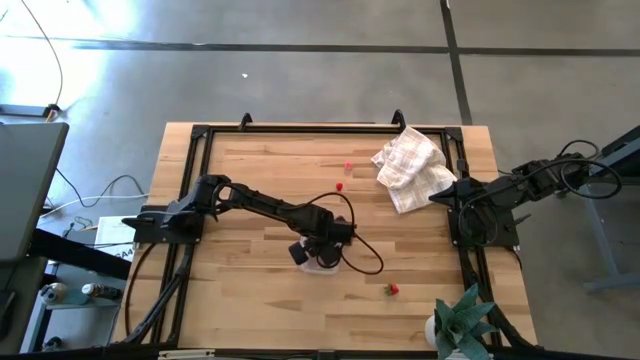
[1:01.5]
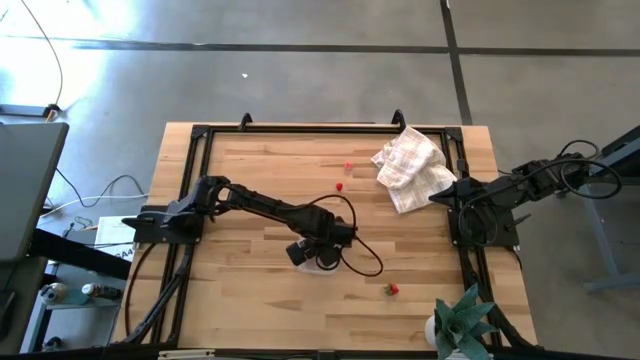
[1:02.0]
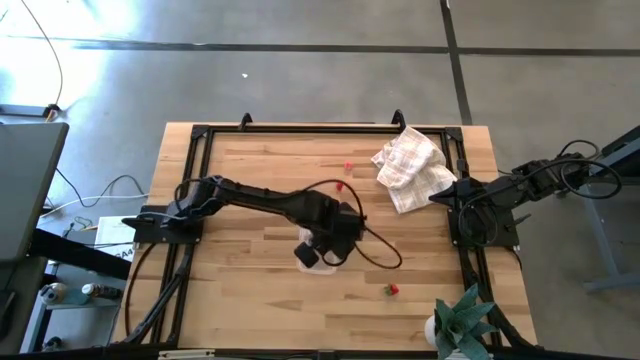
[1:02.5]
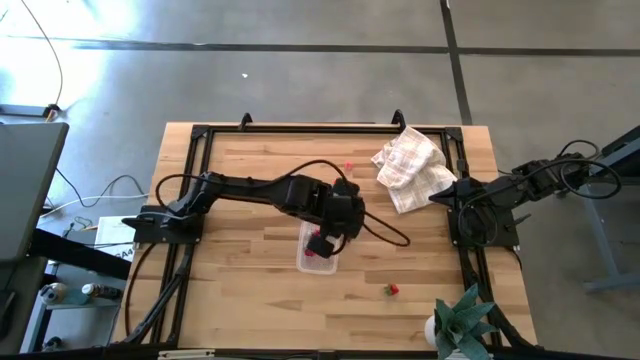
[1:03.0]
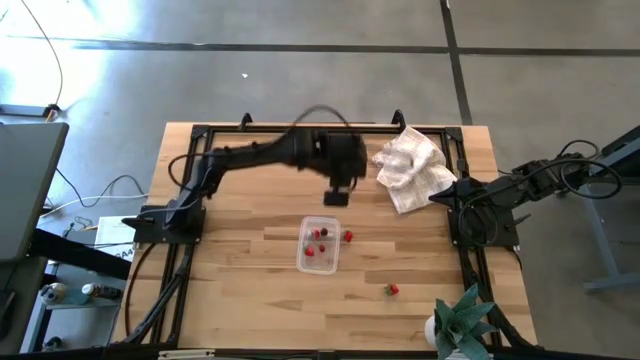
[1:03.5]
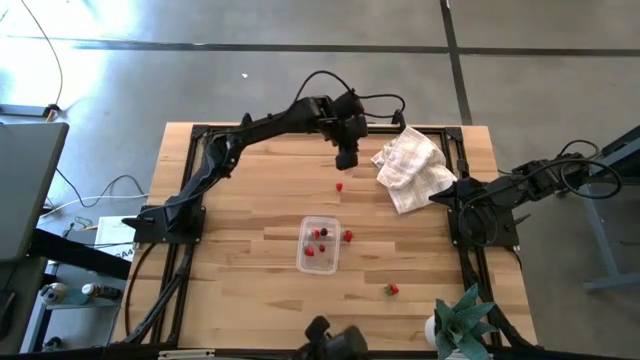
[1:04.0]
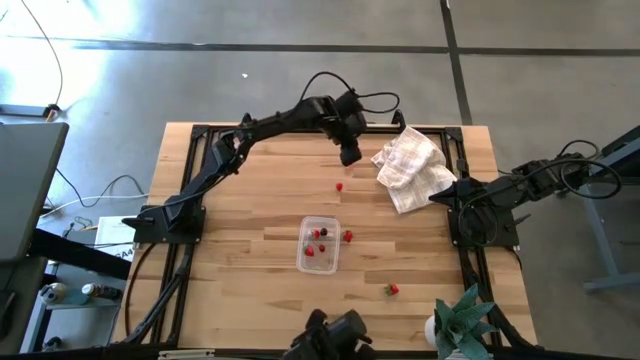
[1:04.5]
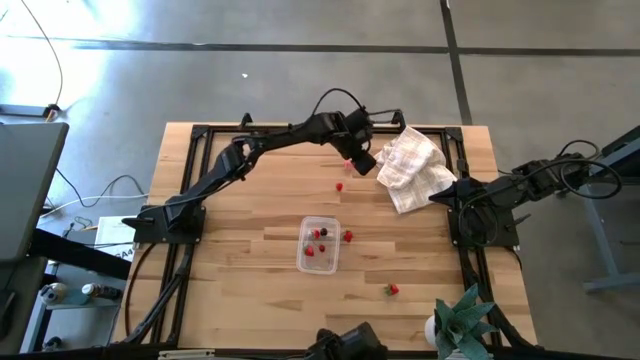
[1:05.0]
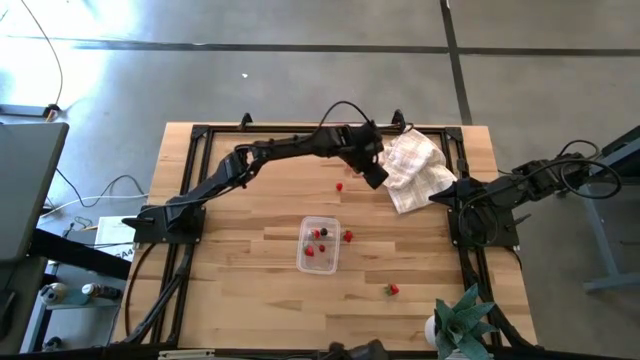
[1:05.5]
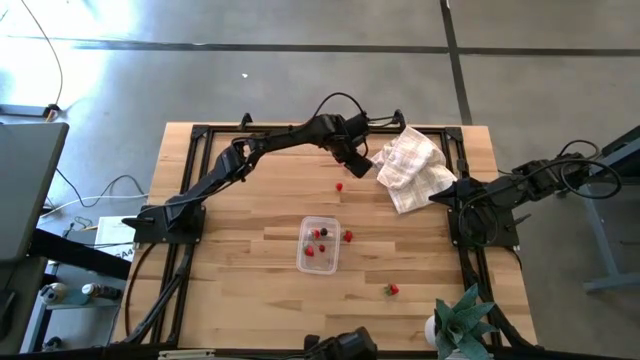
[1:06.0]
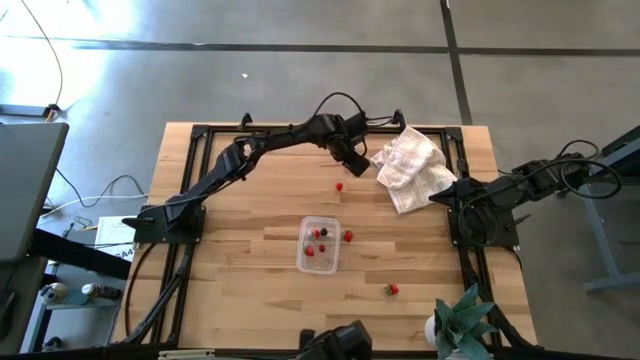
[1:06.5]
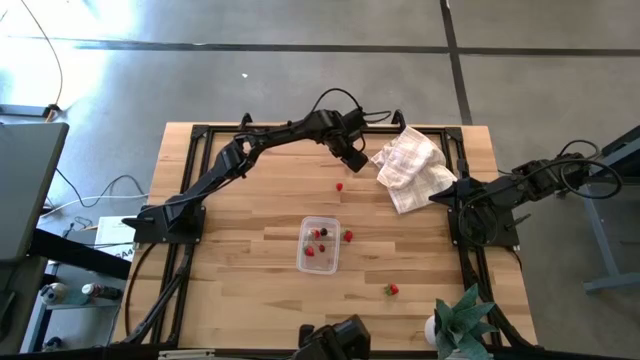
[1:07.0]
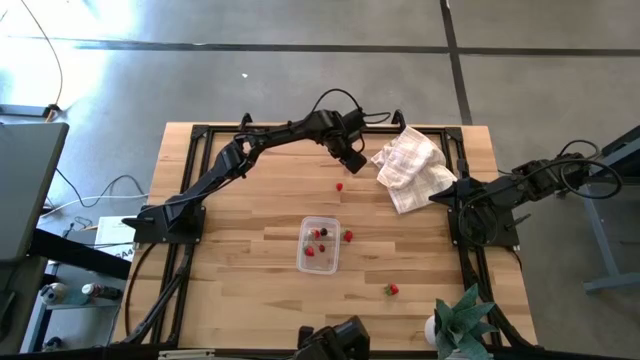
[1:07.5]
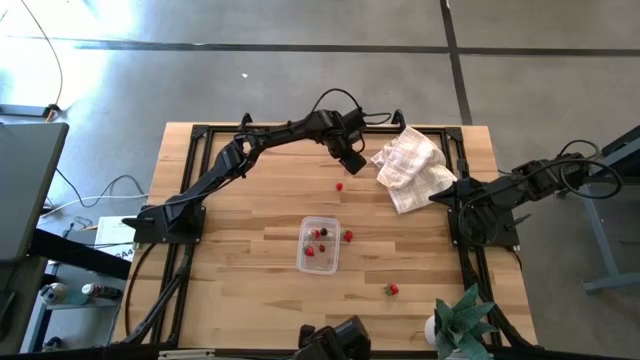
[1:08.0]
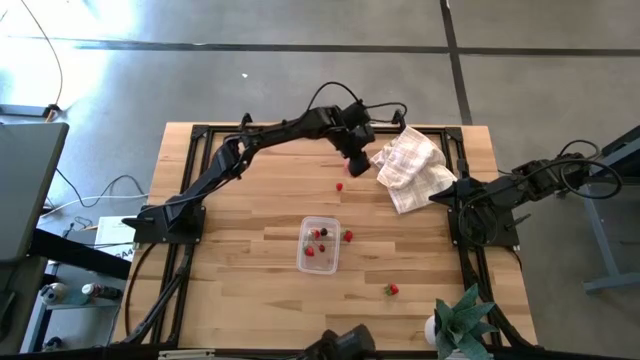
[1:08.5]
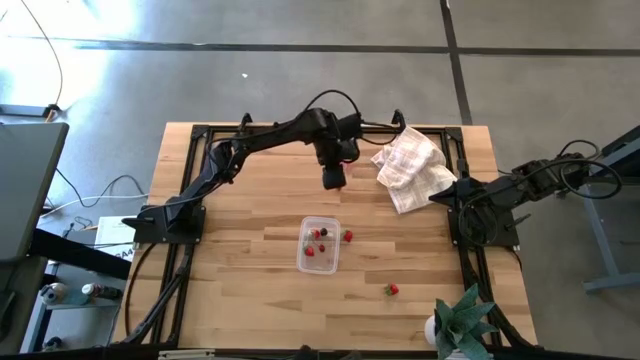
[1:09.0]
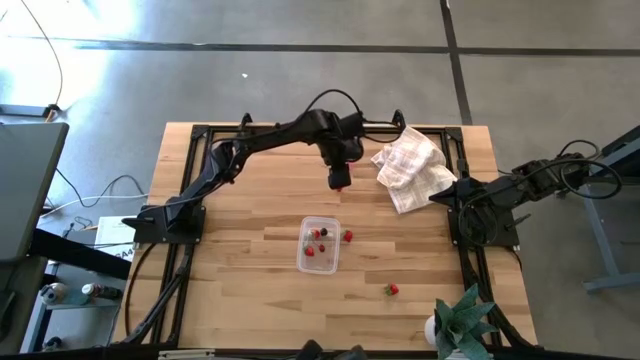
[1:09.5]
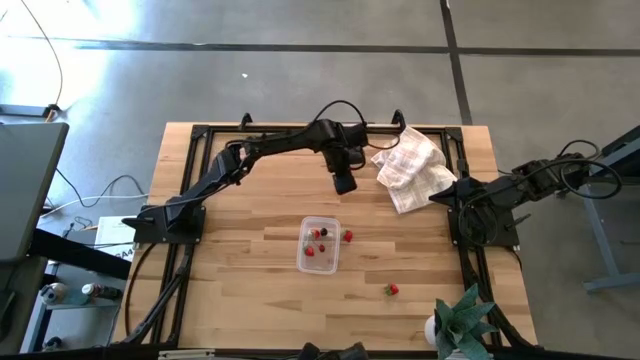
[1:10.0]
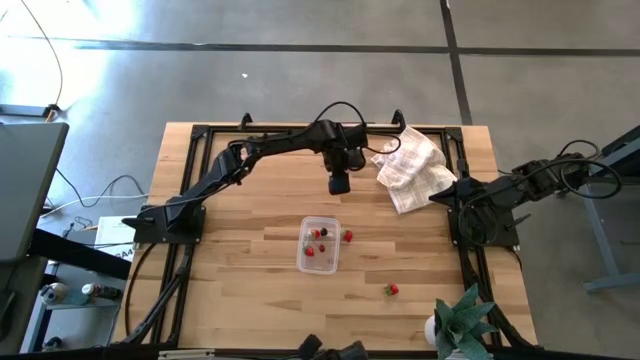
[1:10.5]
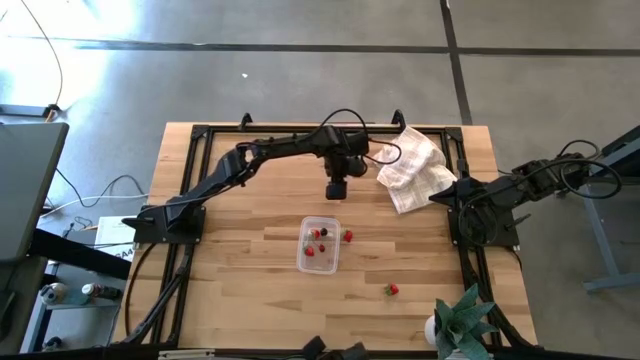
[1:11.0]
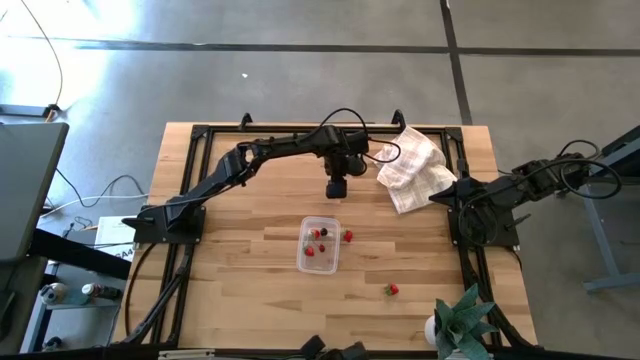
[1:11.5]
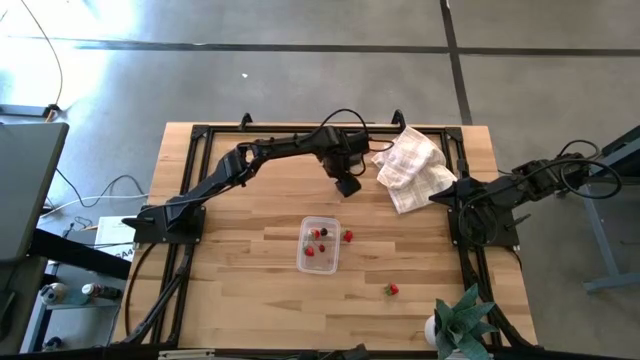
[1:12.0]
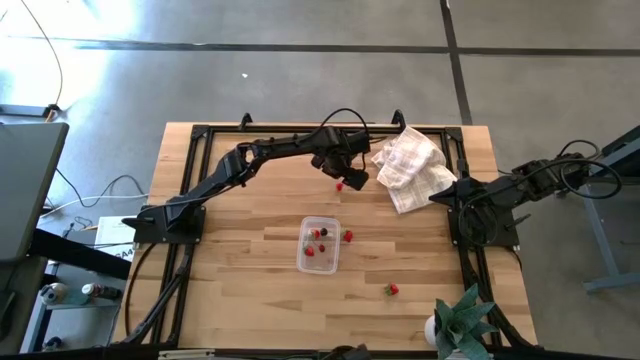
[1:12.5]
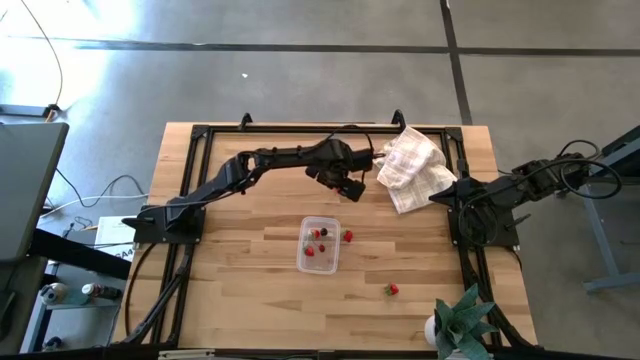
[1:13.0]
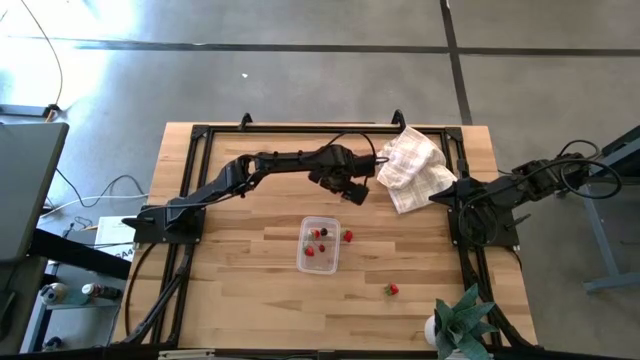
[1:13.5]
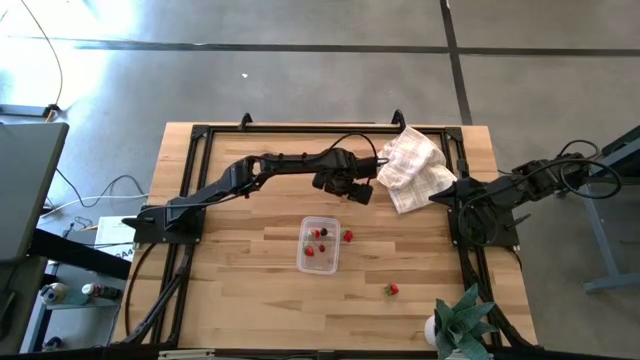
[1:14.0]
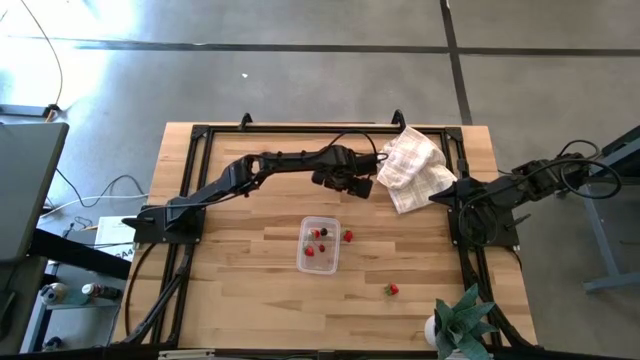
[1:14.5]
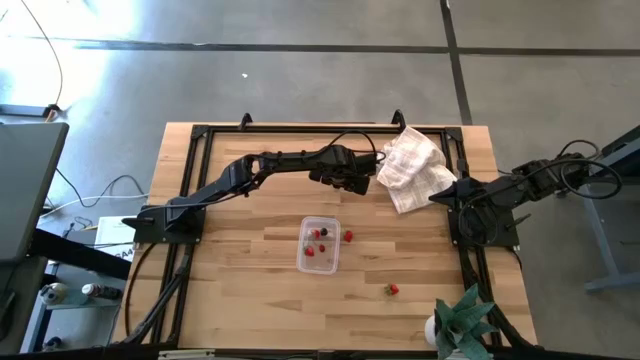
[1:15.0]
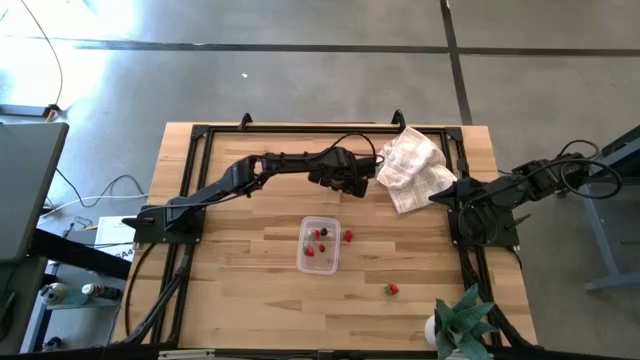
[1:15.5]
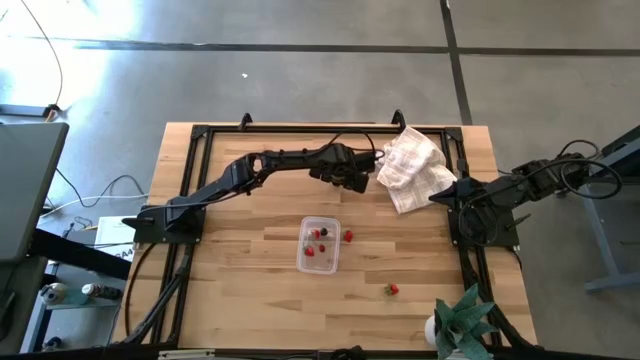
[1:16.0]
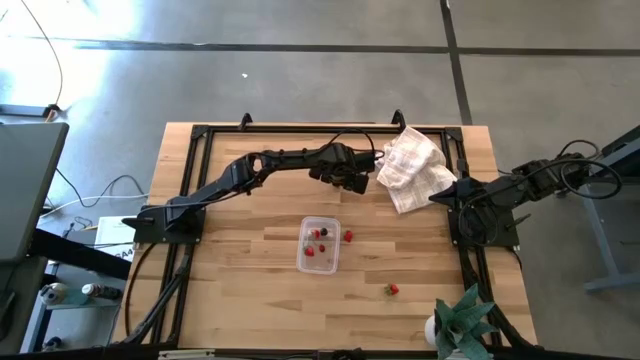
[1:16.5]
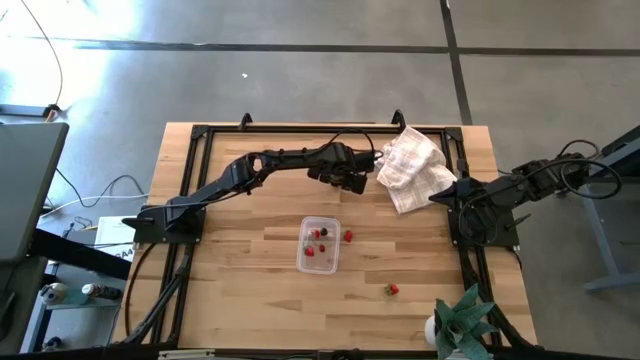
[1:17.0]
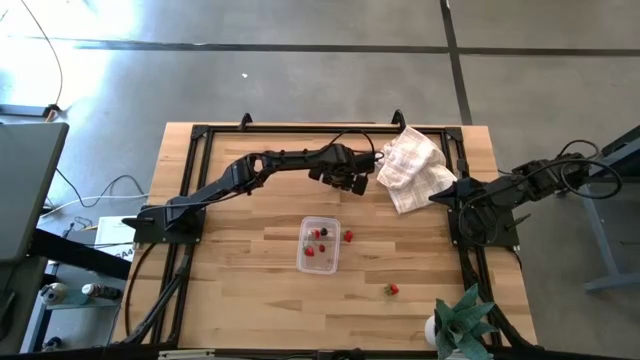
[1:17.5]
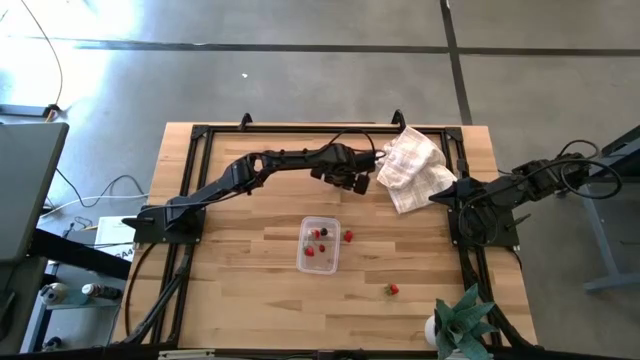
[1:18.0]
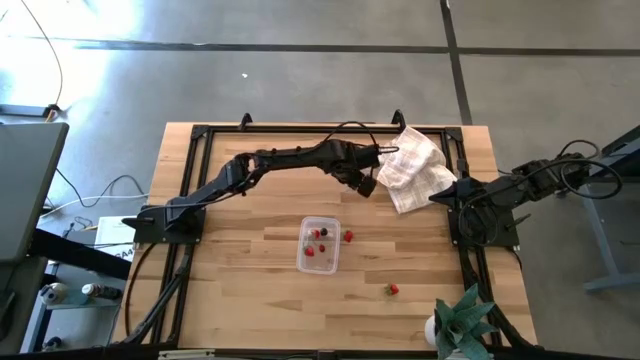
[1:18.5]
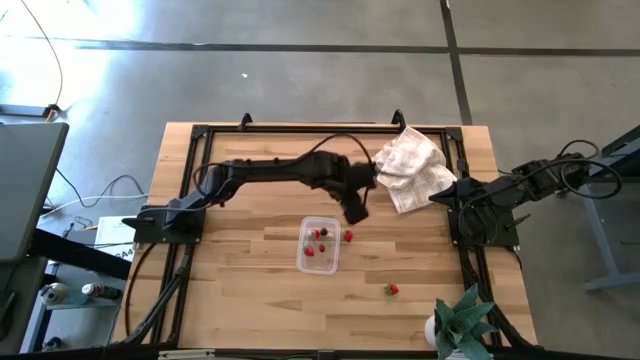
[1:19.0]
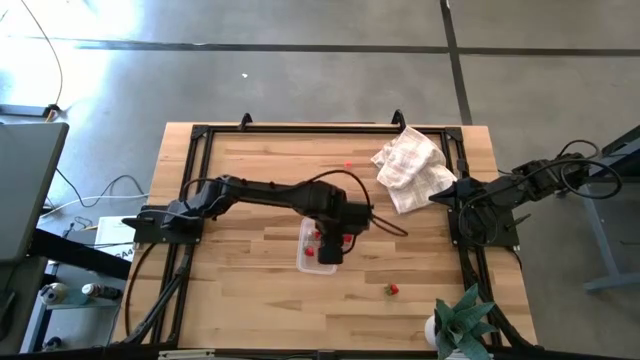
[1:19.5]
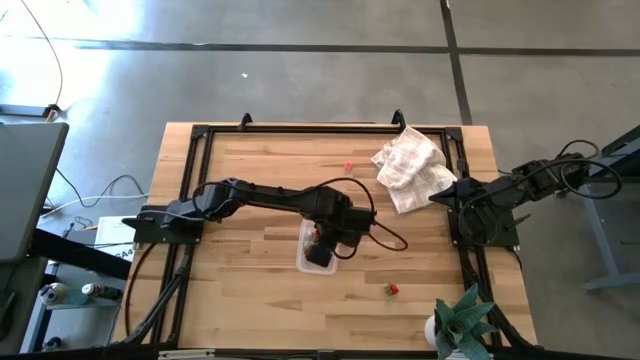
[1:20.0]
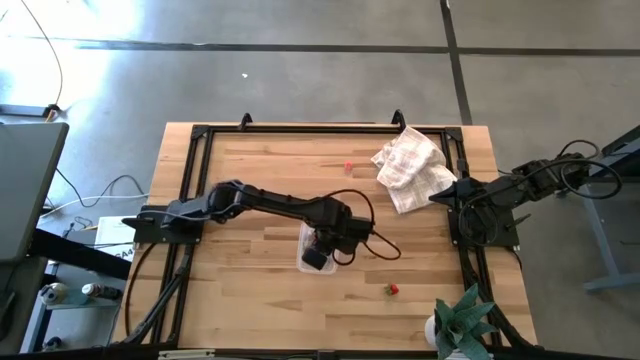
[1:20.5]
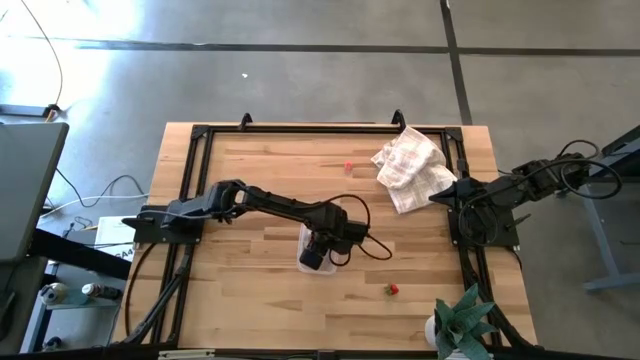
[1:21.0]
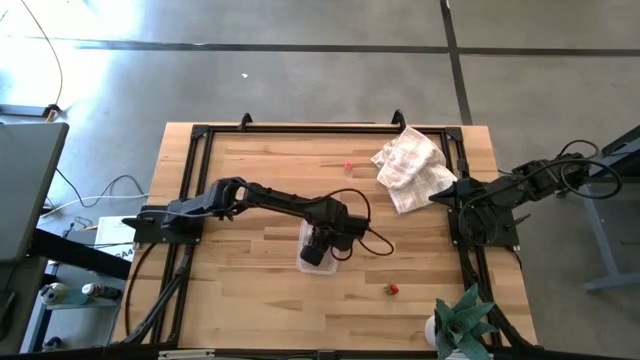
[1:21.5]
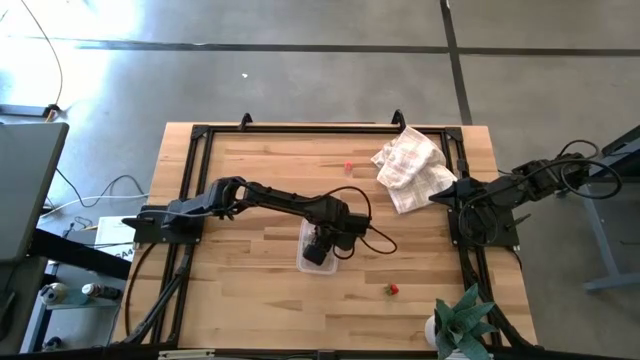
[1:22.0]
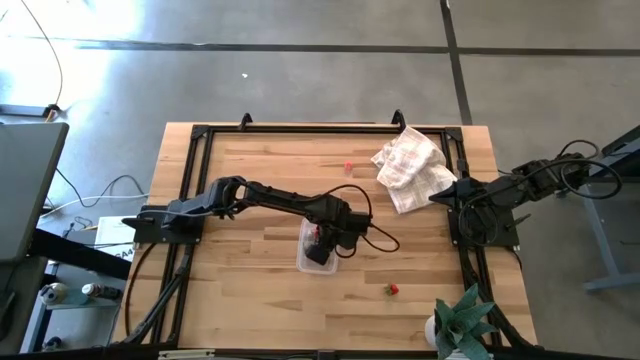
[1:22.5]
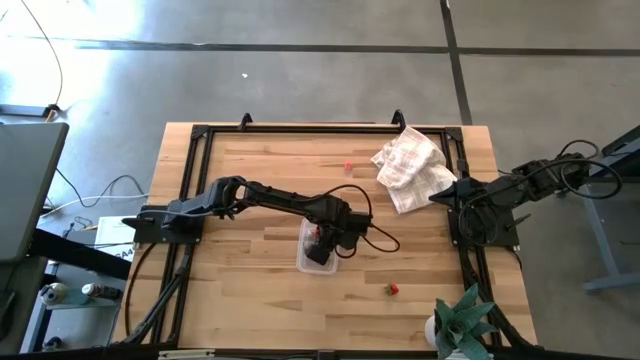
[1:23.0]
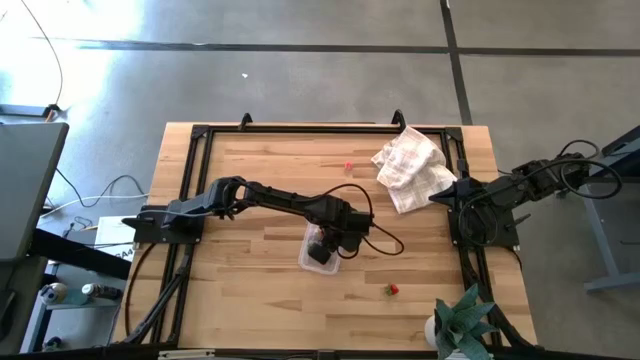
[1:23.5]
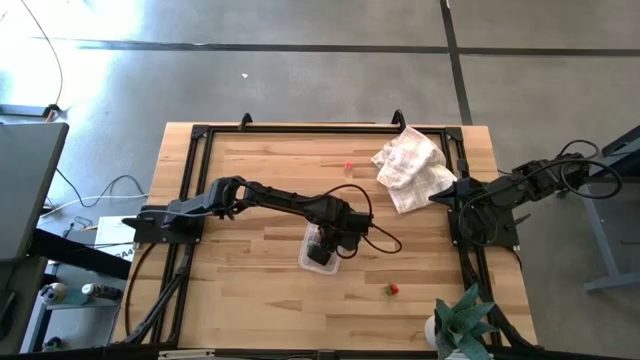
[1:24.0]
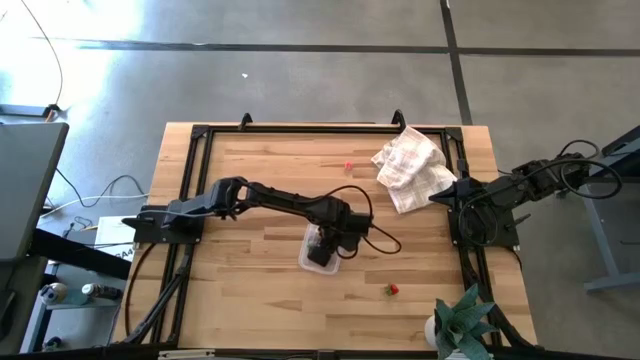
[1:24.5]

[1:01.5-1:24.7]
Task: Pick and placing Produce into tupperware
Put the red raspberry into the transparent container
